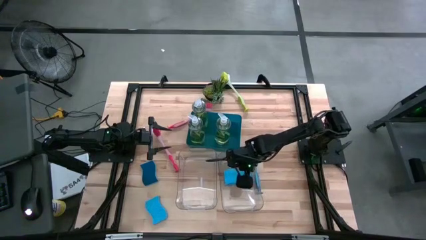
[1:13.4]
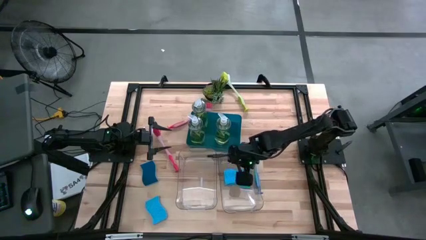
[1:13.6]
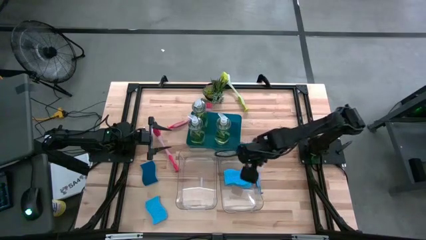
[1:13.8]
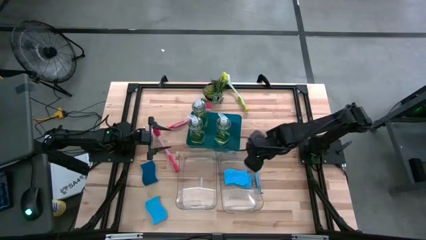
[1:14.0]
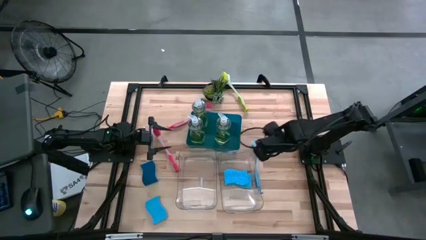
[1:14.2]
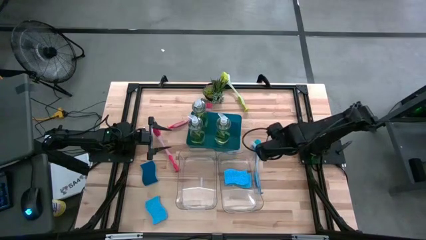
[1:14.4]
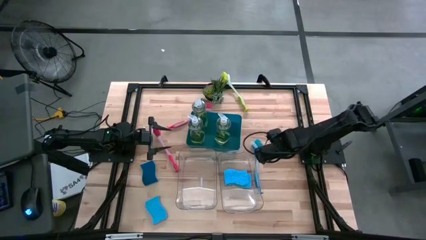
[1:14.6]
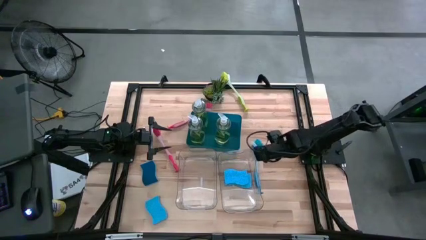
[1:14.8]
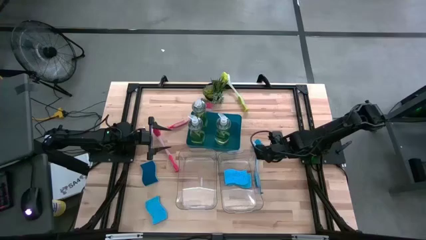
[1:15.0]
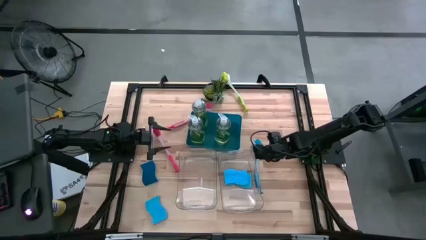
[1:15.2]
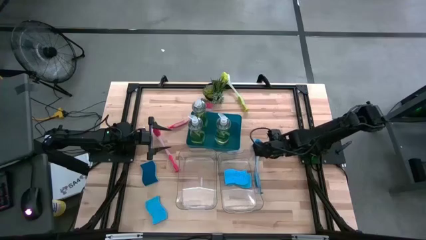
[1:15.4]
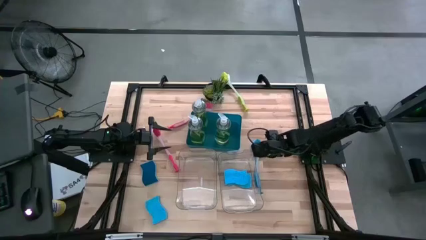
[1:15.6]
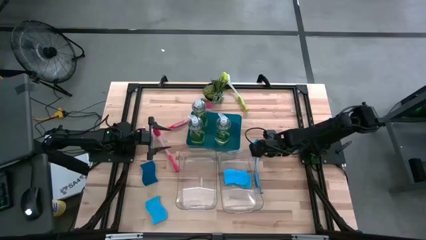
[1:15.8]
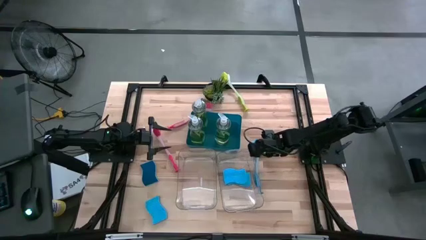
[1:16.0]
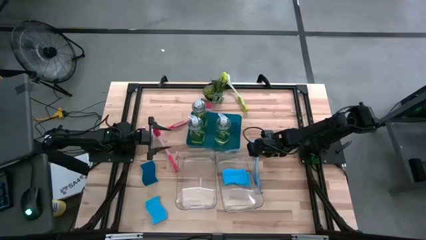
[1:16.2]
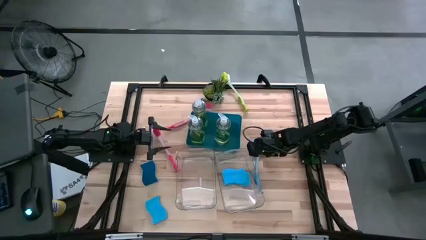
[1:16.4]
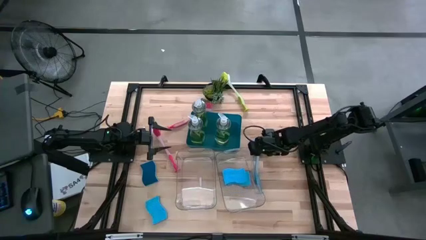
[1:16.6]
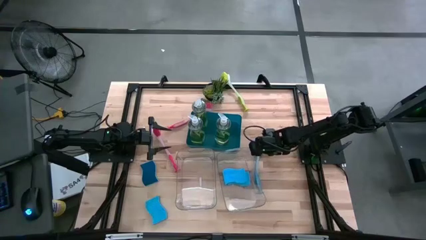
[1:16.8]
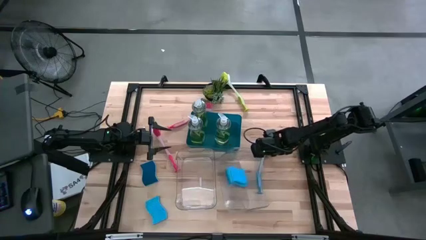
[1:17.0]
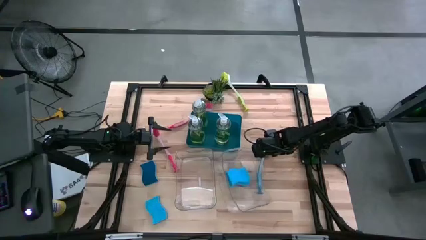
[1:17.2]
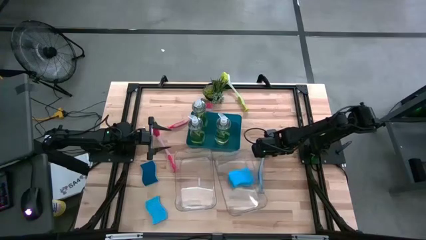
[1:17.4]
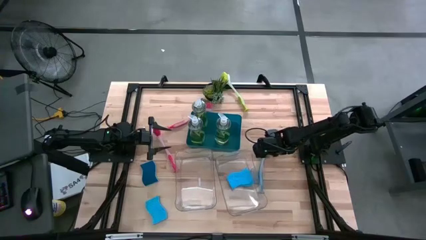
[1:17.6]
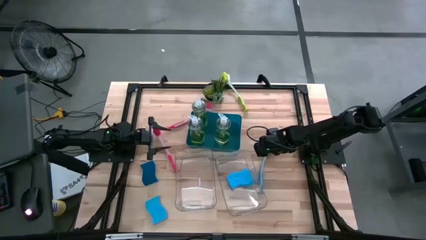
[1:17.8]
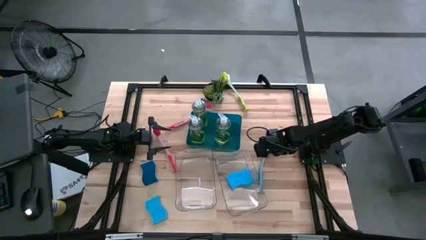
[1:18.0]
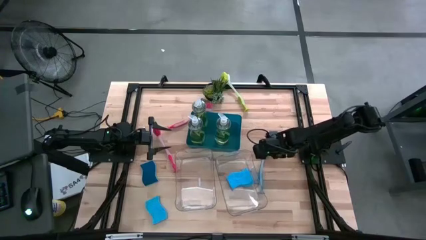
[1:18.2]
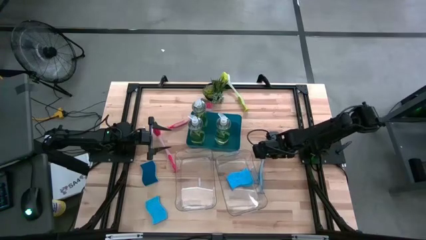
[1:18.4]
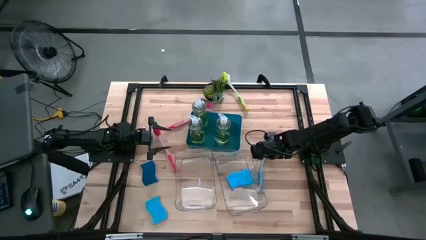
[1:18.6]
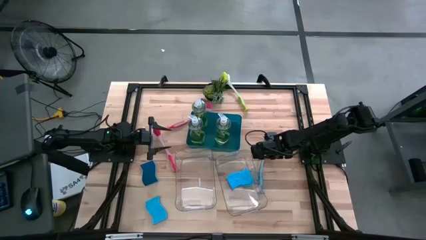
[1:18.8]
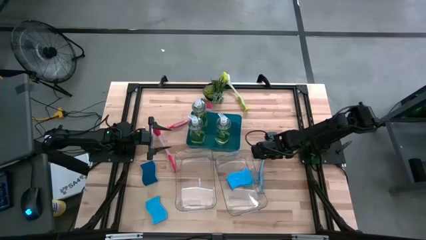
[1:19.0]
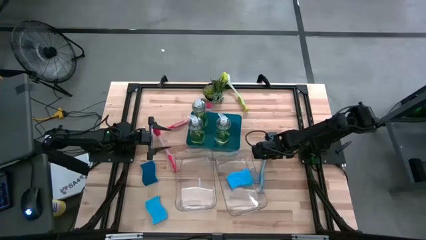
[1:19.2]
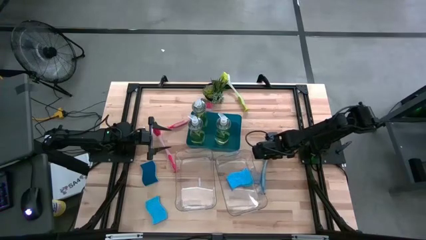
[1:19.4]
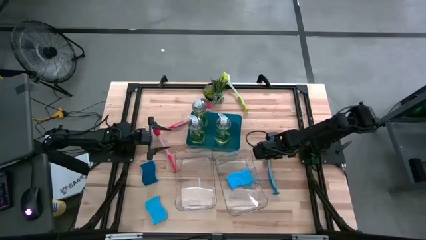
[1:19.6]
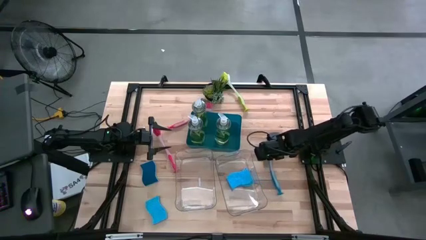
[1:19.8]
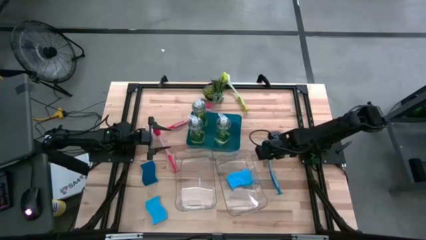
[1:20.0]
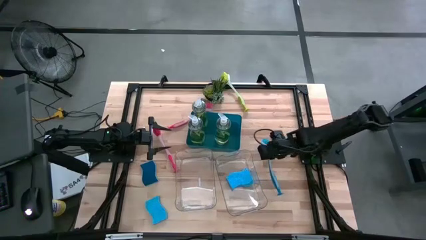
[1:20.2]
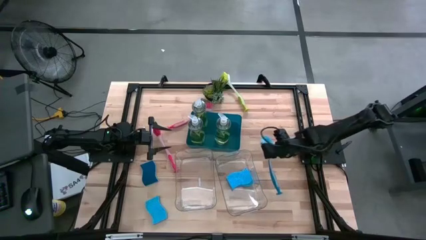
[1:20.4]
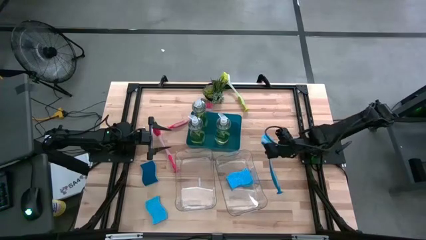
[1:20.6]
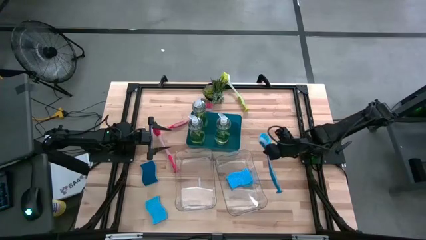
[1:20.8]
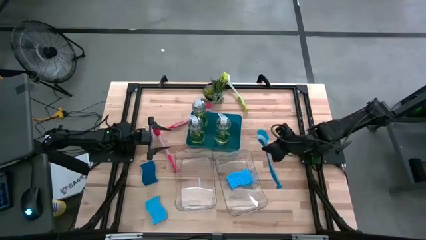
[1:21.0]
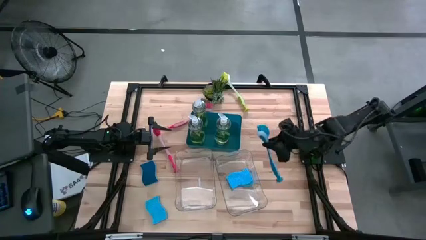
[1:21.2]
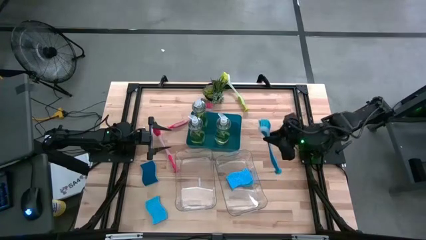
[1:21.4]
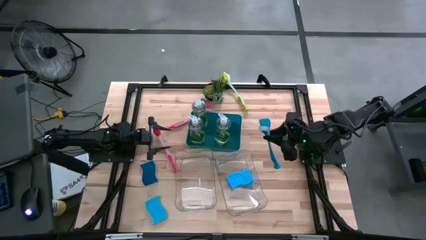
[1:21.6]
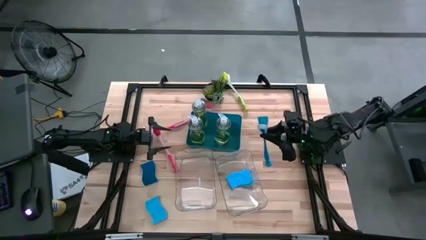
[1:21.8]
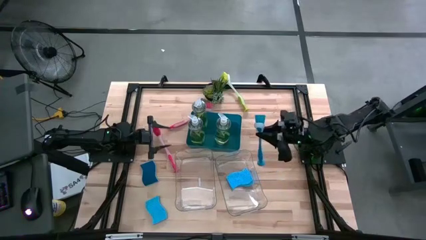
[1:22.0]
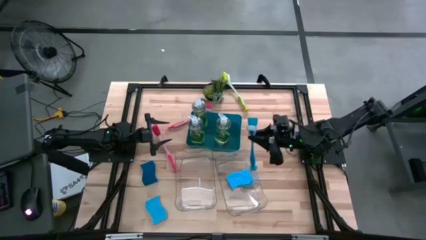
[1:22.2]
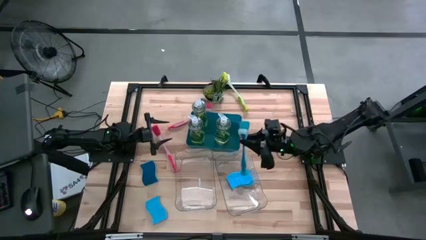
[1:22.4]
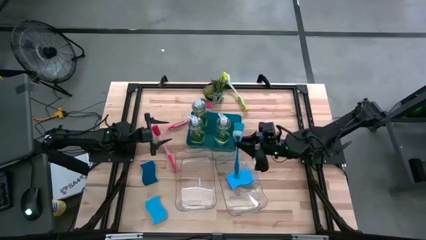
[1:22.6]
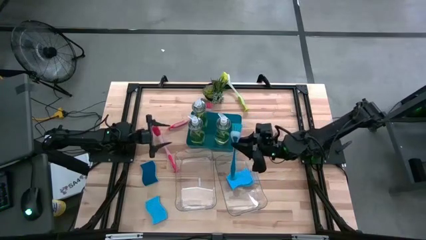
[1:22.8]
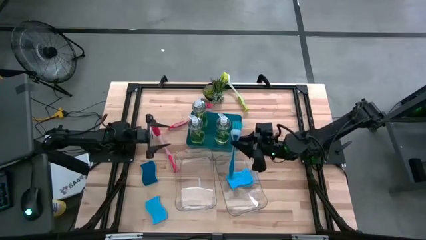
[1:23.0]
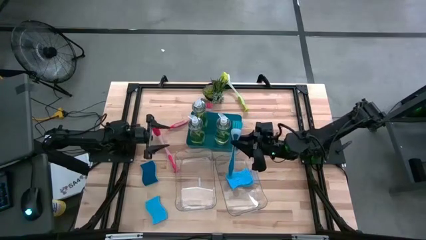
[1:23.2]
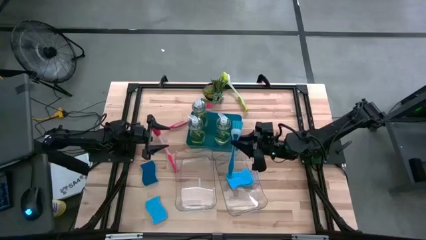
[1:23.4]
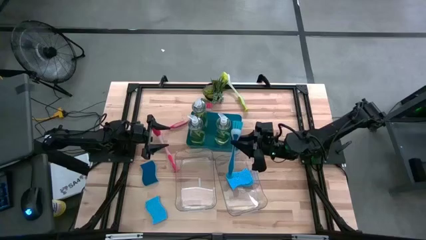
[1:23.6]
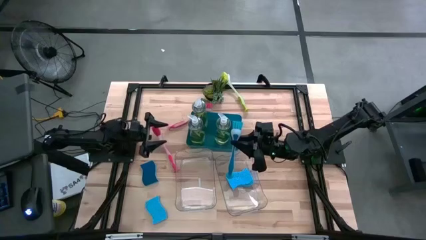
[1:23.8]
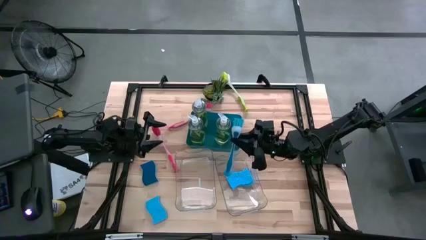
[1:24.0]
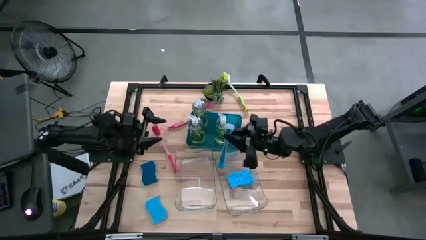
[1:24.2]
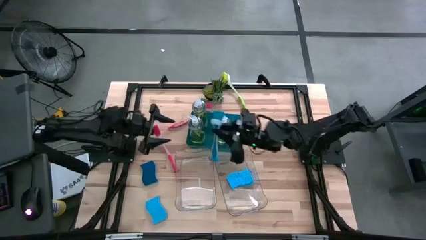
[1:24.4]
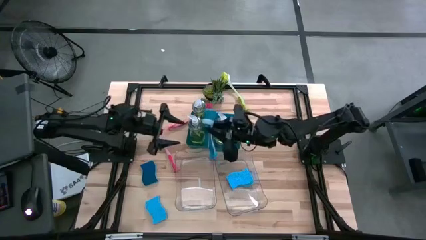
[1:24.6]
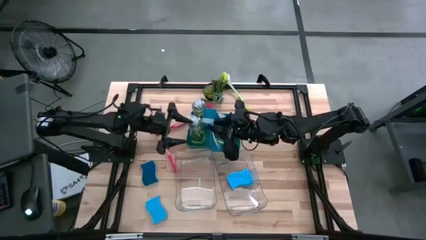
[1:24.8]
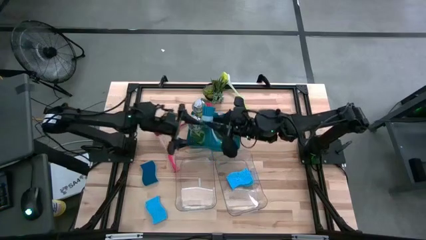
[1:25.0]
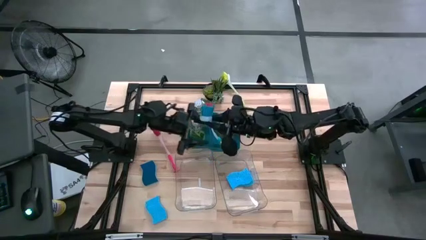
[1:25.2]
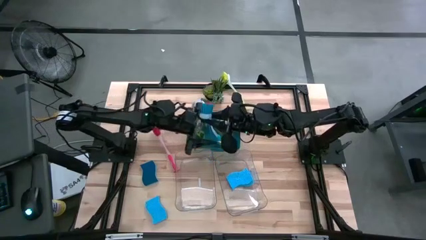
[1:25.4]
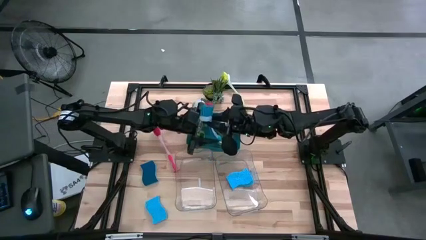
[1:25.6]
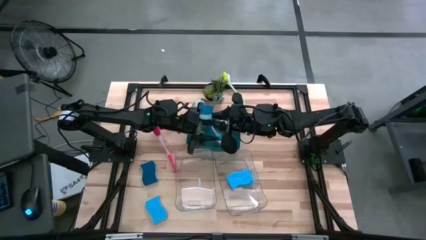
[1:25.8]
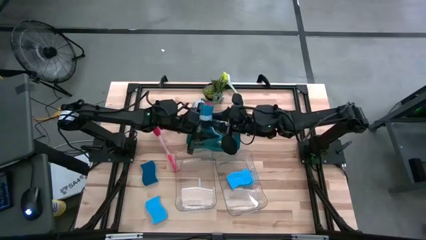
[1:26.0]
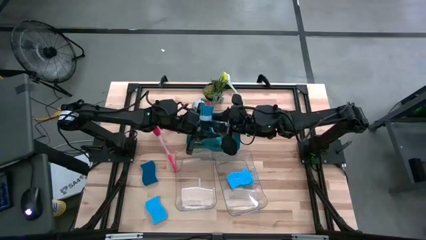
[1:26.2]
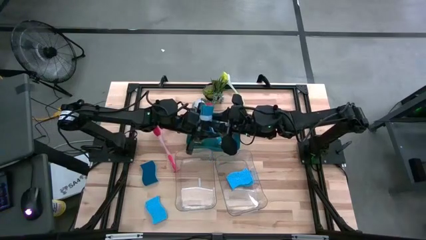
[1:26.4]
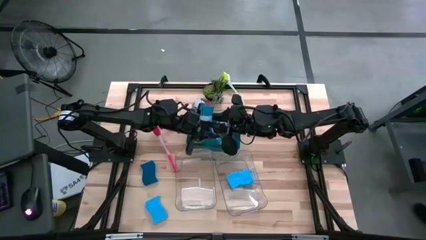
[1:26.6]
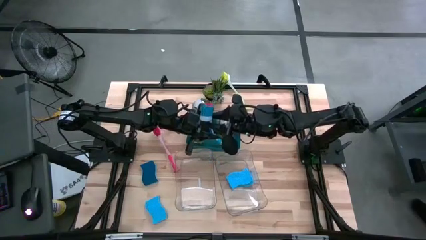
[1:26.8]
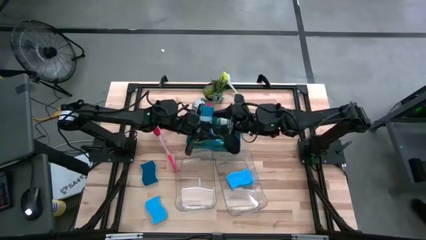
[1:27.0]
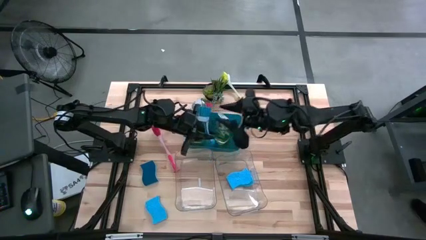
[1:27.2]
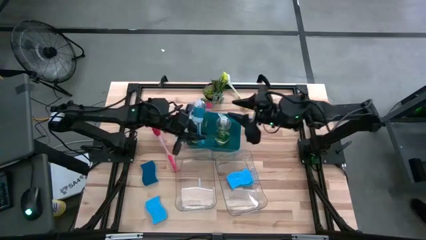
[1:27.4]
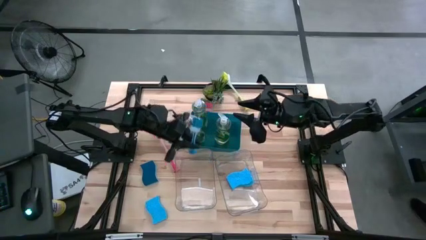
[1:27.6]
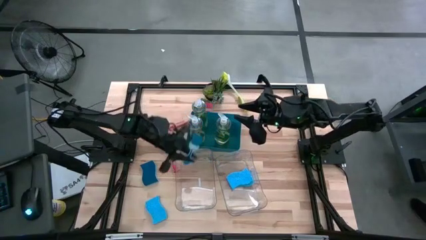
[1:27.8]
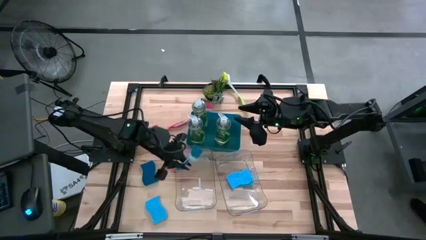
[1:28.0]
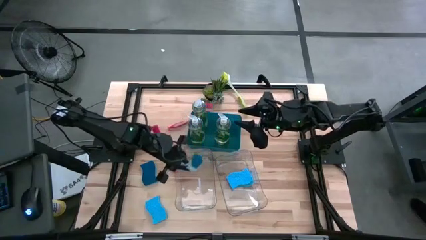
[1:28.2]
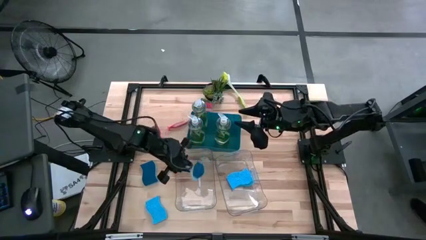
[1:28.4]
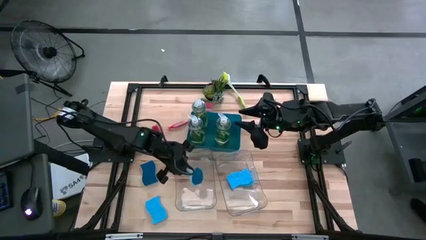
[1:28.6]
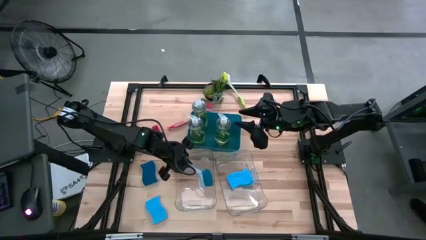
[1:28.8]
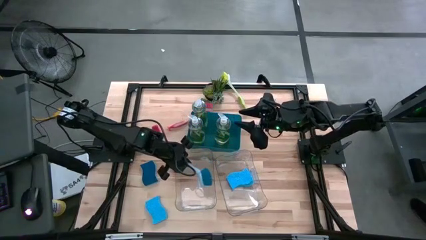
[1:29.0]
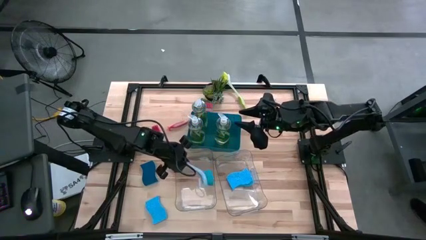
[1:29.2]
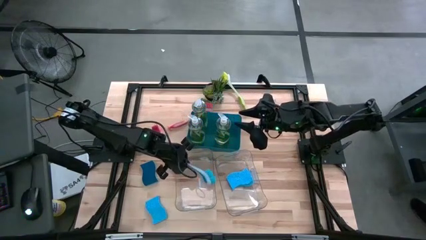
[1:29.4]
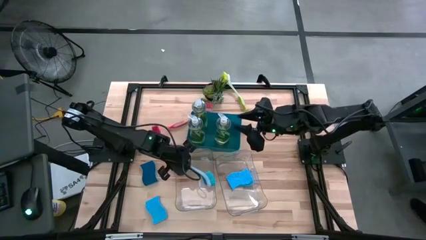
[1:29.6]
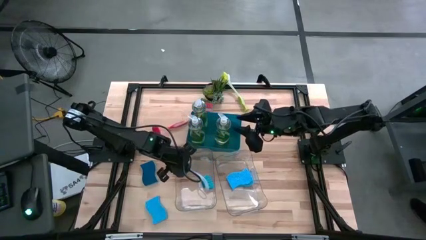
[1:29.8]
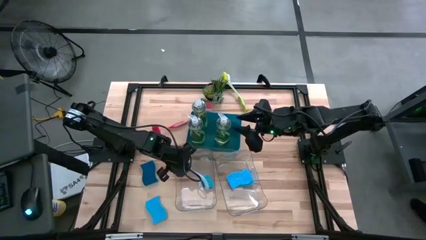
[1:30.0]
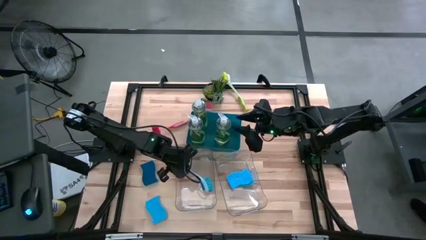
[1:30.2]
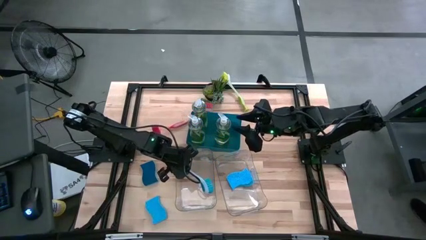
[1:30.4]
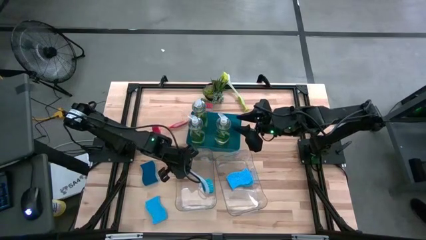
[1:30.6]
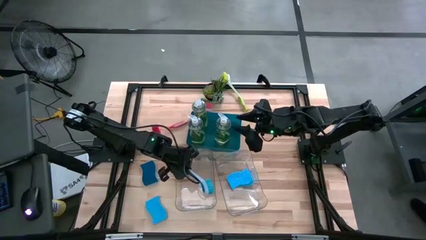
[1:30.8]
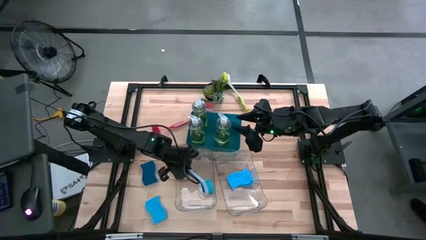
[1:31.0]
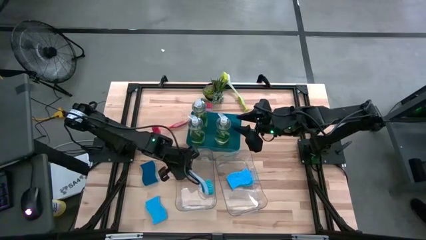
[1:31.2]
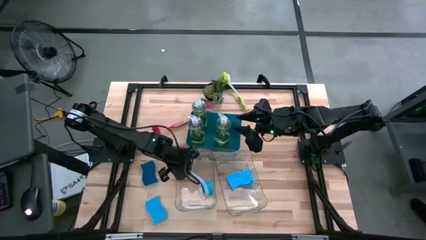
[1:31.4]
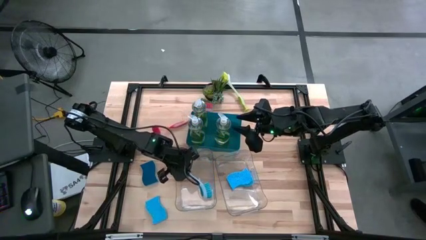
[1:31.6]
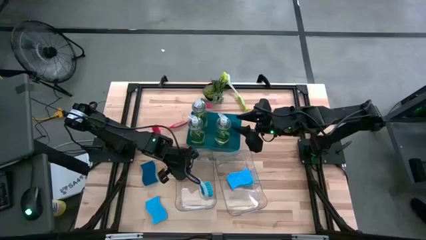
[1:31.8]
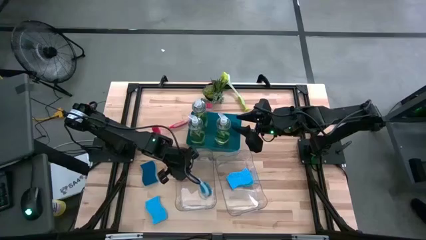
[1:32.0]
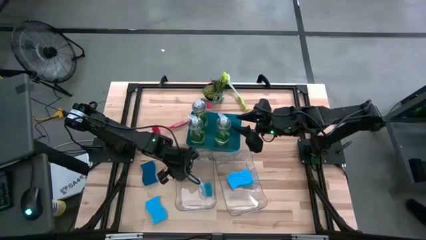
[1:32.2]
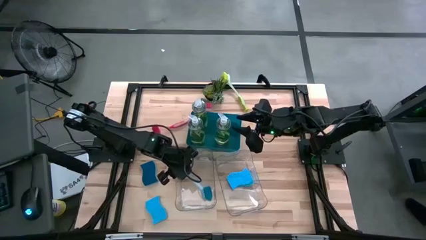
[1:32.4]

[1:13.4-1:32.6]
Task: Pick & Place Kitchen Sink Supplies
Put the blue dish brush into the left transparent bin
